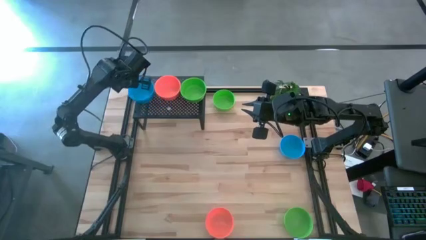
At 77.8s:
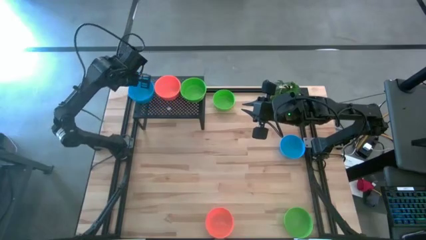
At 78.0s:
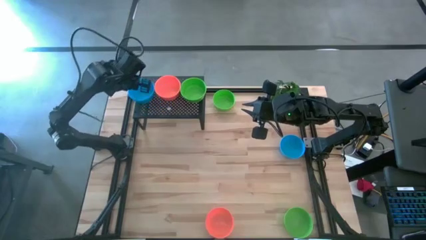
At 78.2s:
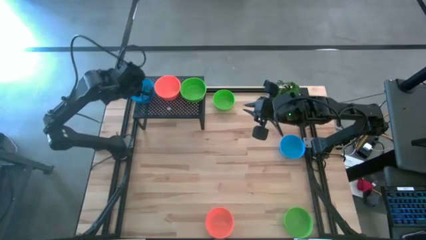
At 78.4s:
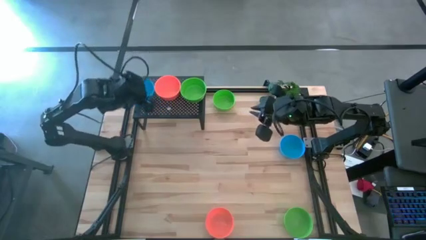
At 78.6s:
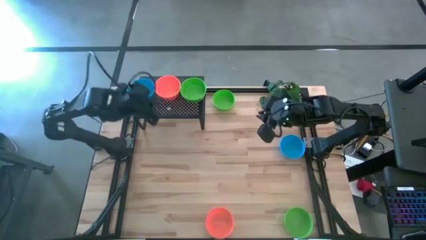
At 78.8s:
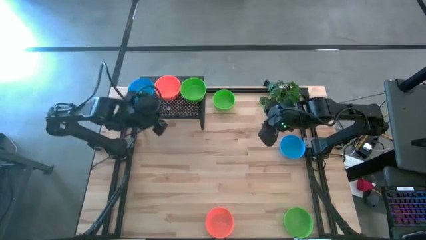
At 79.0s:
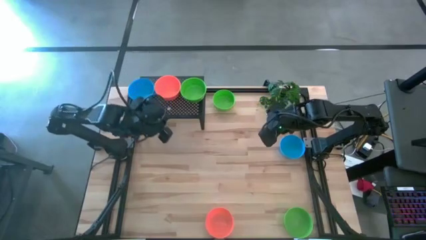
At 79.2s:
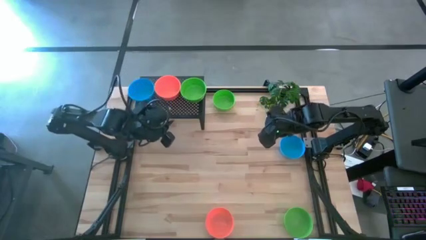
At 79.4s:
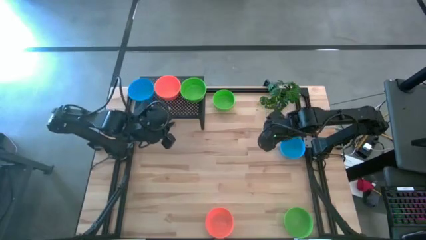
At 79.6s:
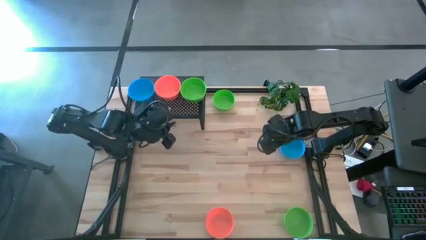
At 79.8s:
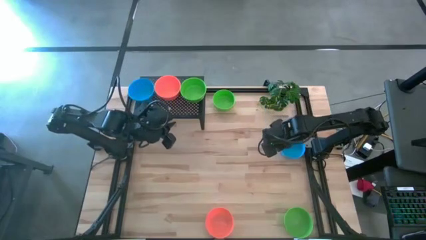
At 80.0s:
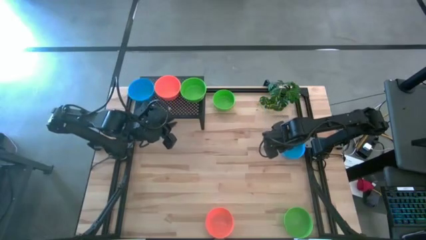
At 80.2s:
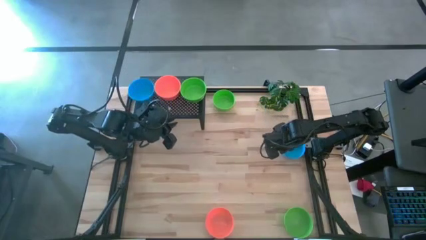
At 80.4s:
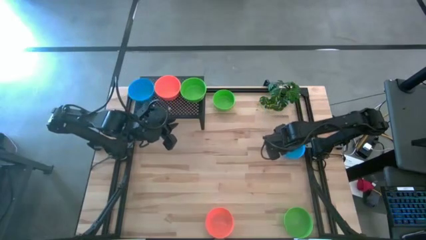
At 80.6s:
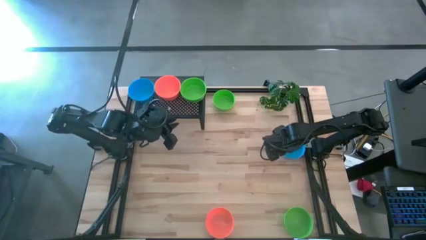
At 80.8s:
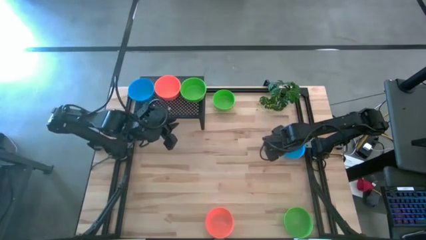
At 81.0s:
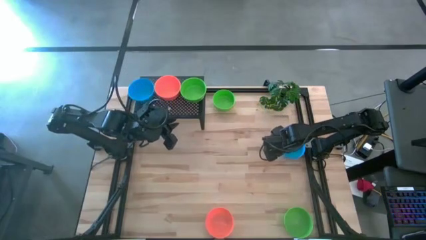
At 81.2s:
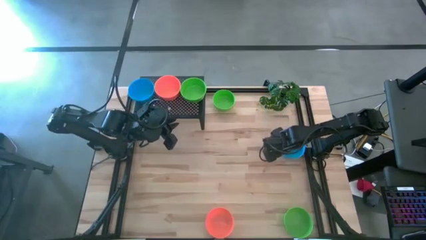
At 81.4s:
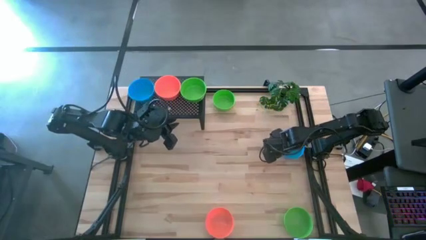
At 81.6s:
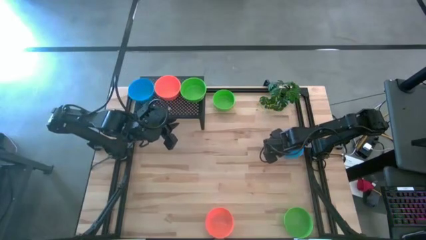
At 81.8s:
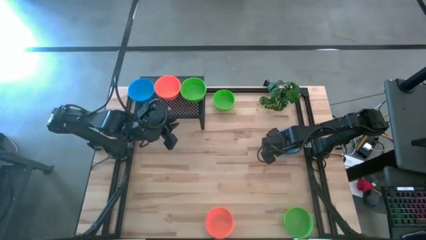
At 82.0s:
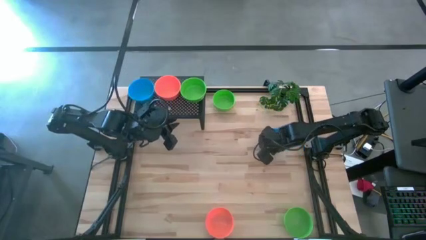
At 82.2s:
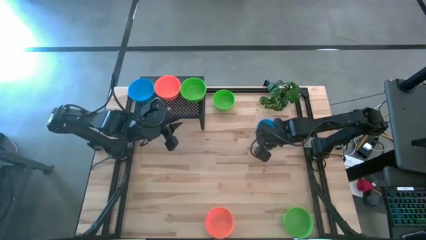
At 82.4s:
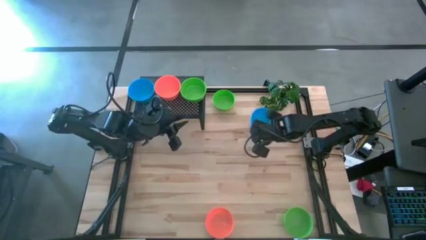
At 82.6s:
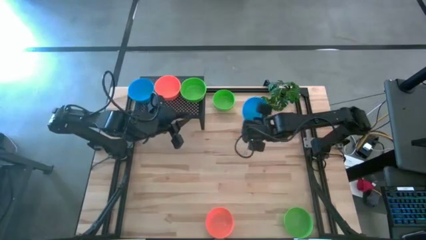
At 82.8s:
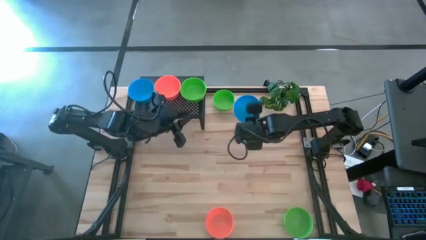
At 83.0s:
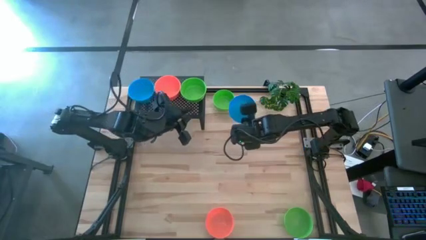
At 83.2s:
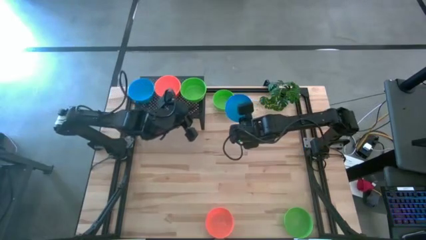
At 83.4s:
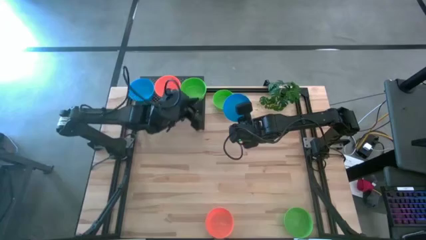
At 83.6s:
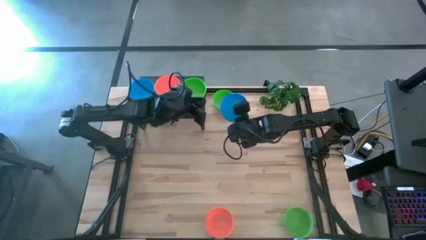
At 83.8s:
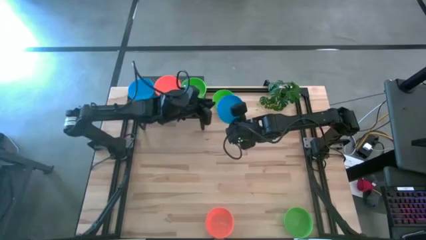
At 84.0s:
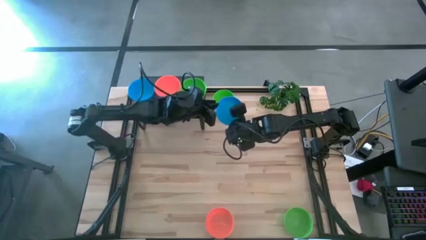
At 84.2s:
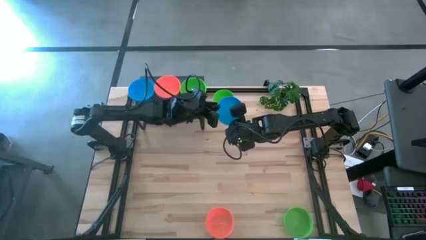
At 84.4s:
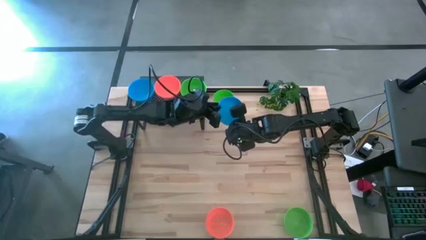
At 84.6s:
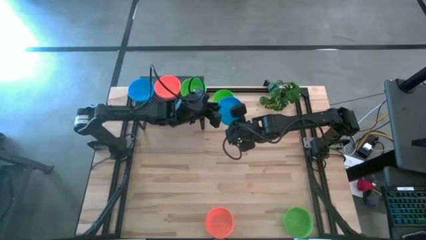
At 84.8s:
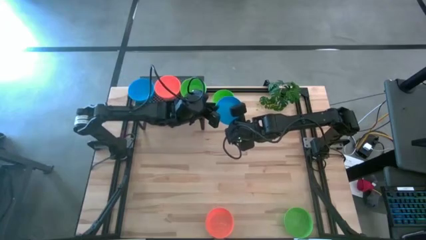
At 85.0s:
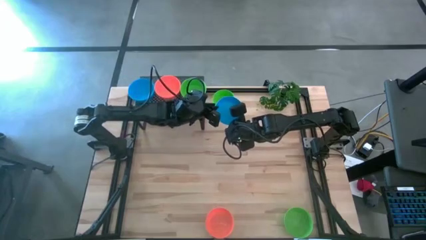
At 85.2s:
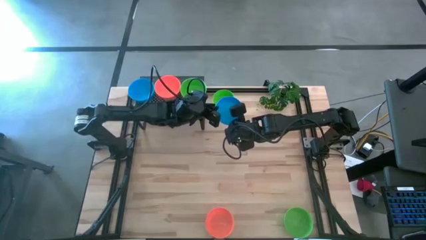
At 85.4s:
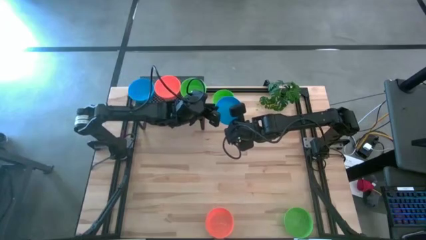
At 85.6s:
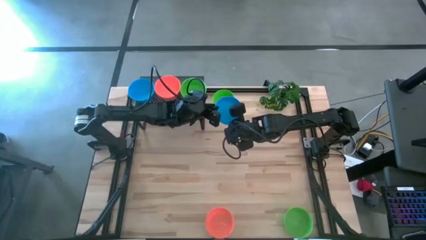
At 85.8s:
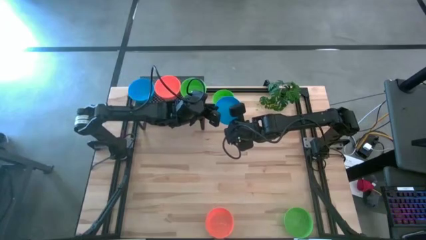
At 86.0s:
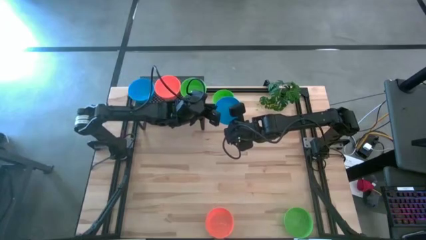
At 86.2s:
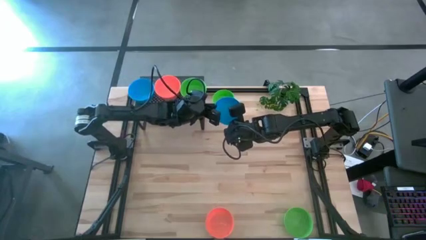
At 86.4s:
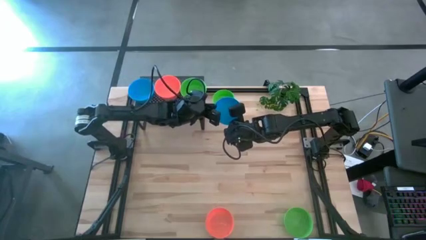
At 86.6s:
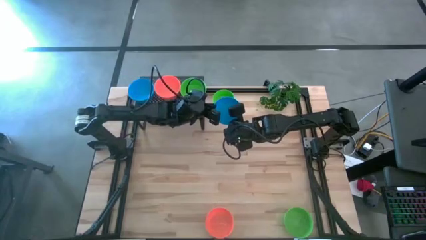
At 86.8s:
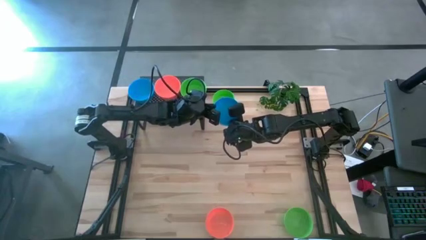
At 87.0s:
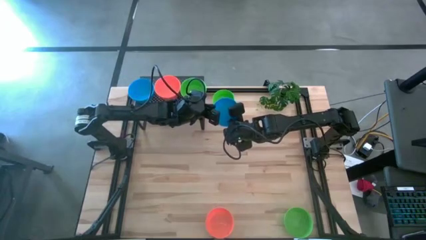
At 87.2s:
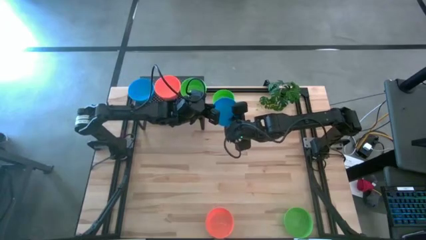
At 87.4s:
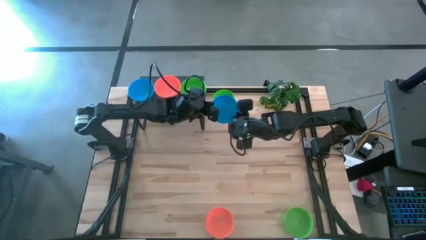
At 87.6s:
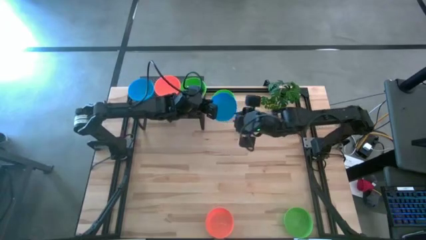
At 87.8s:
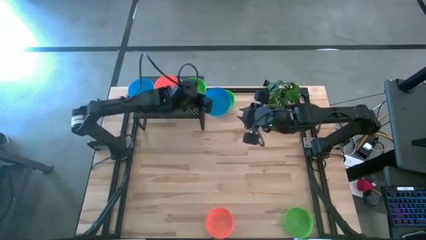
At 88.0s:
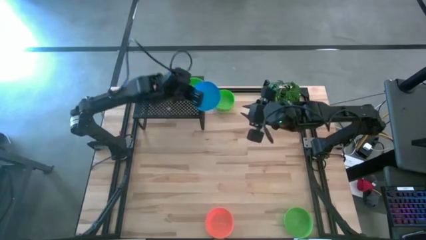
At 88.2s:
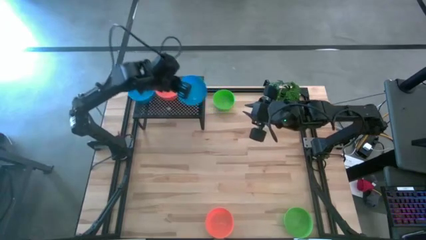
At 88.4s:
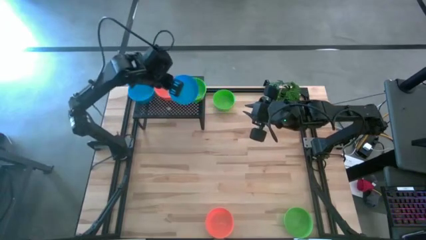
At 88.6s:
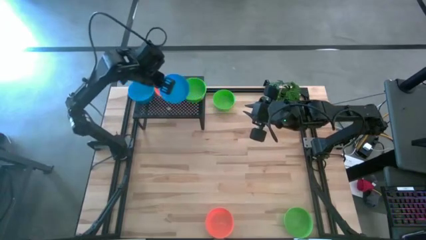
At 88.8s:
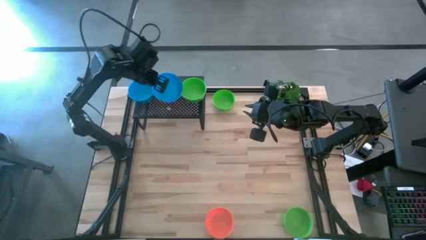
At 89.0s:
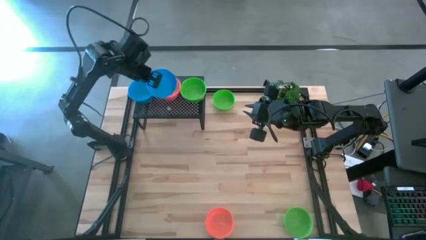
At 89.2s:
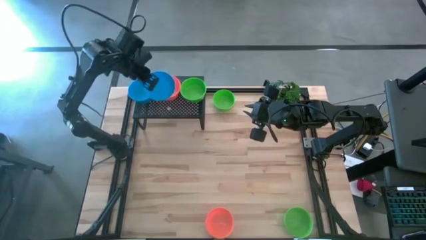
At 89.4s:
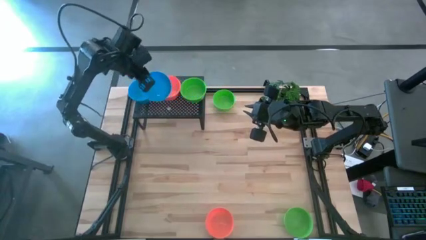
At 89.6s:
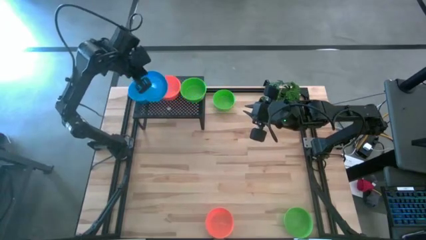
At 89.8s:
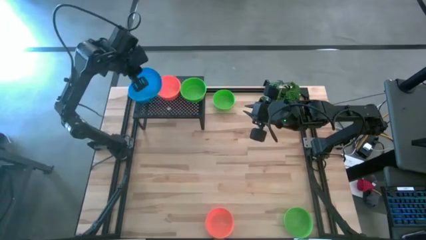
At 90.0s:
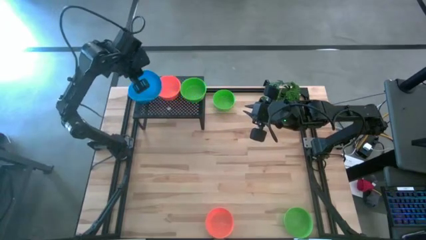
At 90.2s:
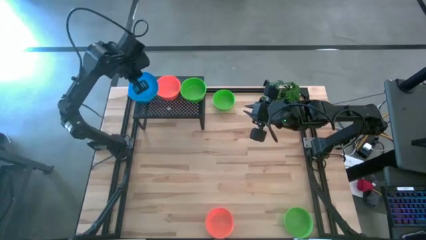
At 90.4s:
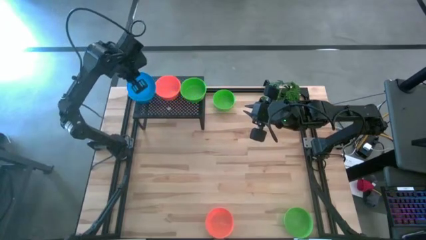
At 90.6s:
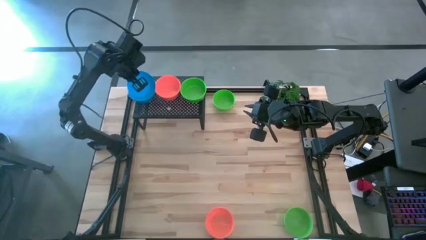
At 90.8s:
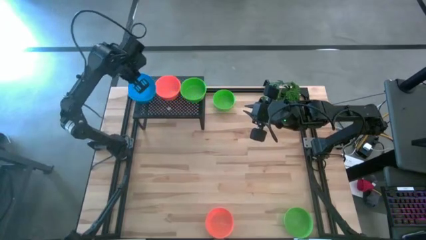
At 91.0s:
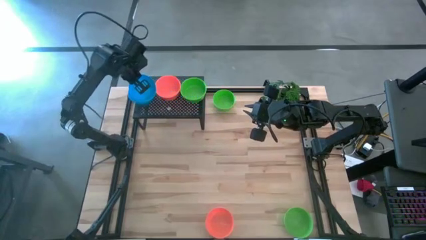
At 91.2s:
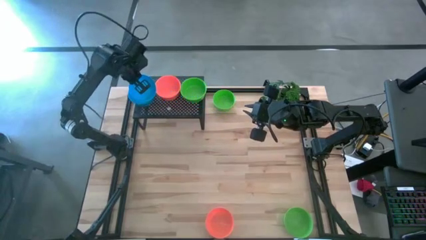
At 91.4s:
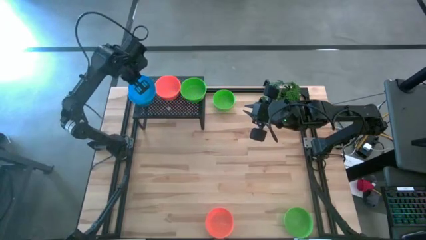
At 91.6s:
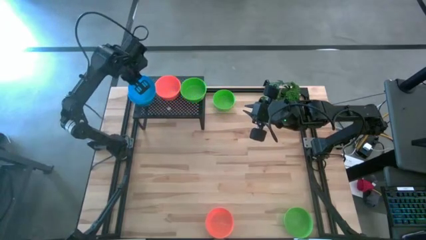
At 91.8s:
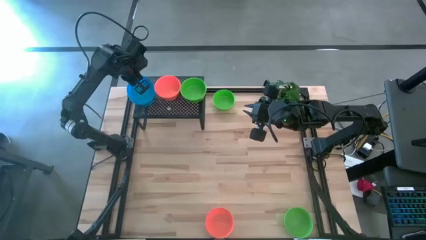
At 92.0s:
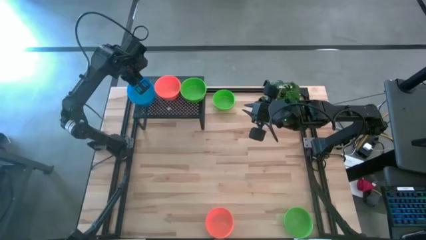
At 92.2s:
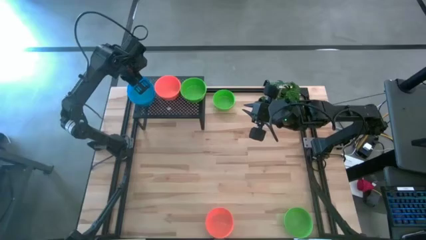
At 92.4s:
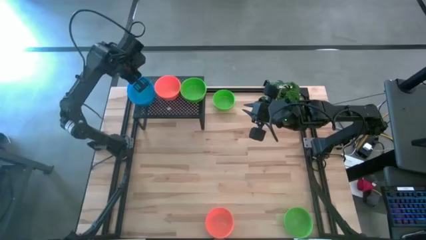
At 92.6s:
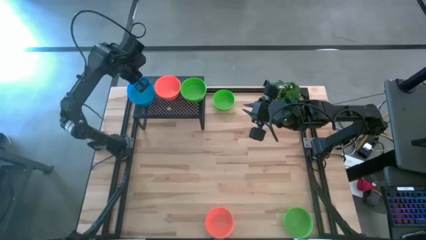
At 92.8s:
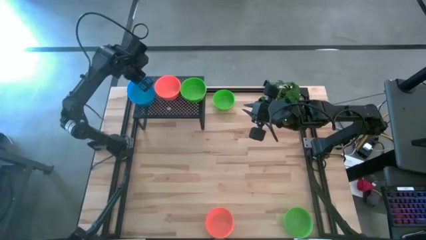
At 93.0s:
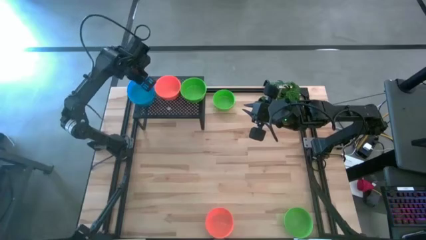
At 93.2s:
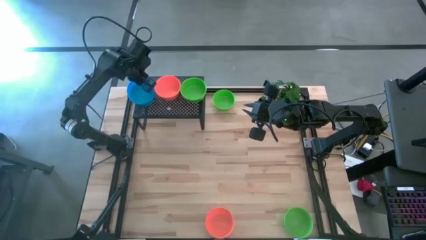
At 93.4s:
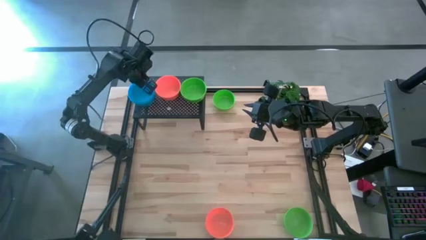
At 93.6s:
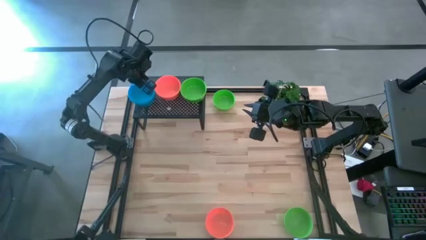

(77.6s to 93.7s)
Task: Pick & Place Mini bowls
Stack the blue bowl on top of the blue bowl on the shelf
